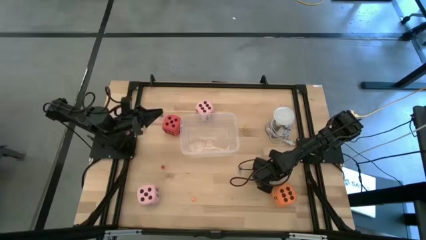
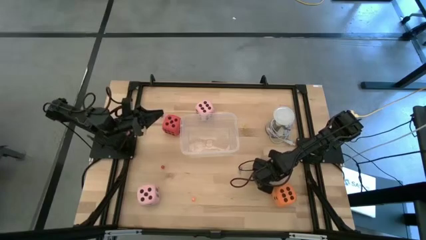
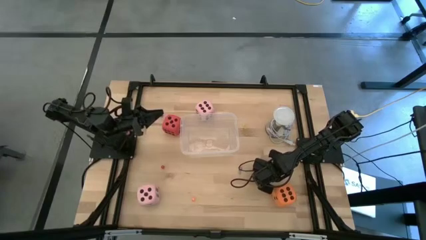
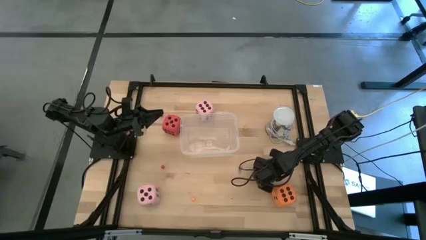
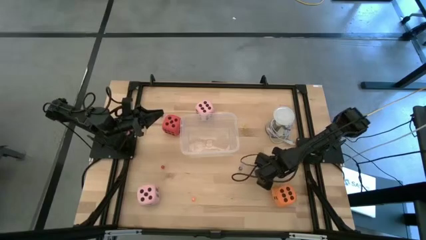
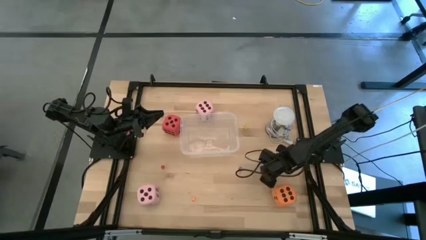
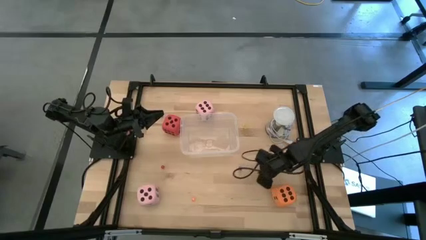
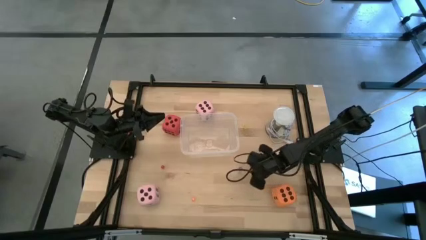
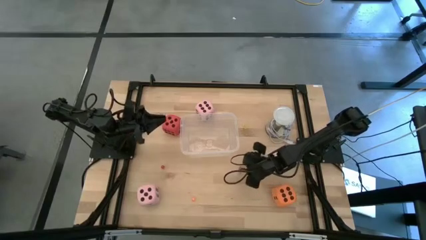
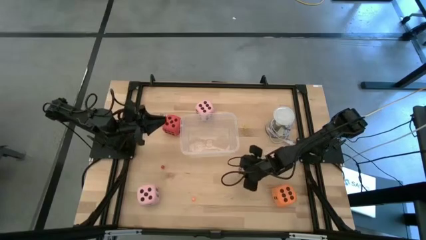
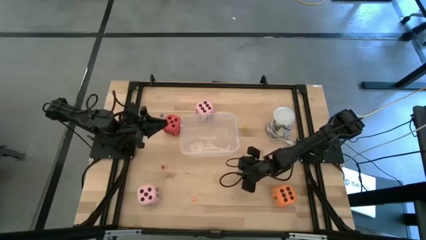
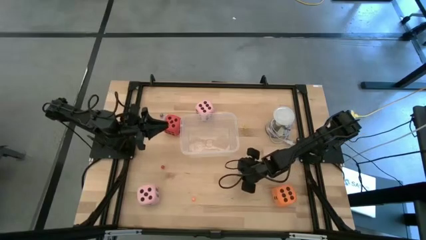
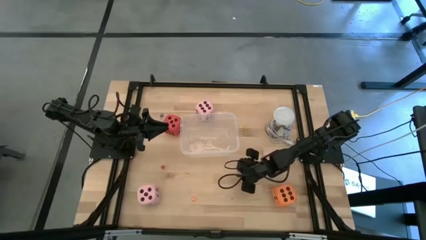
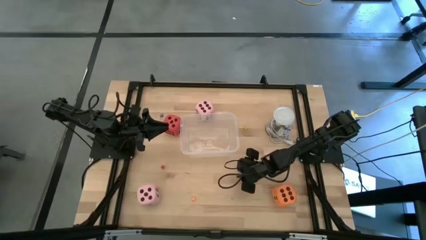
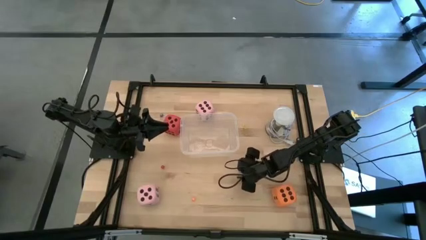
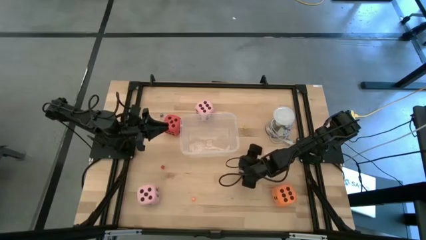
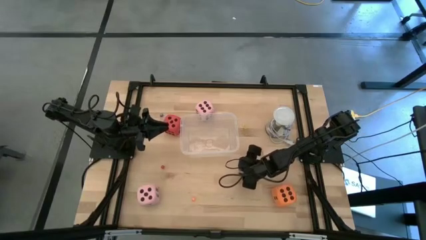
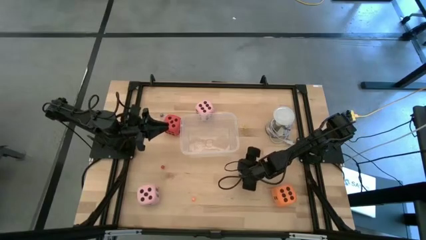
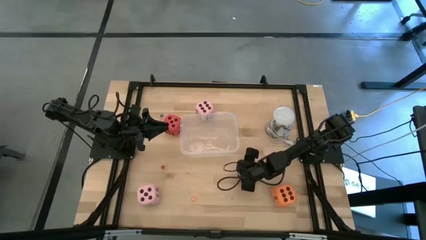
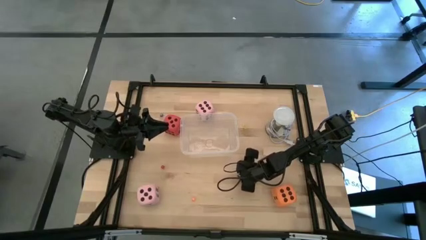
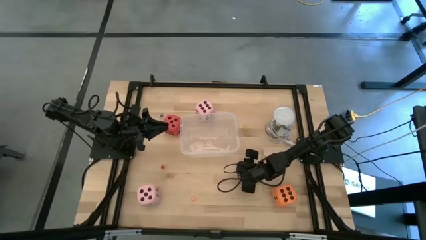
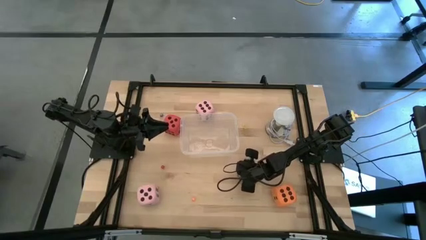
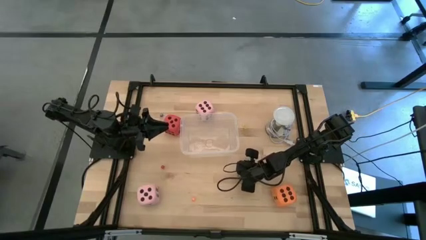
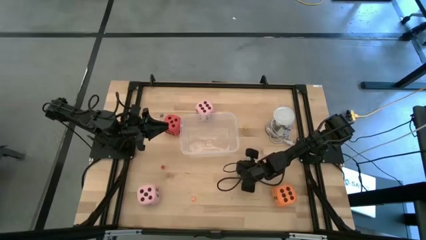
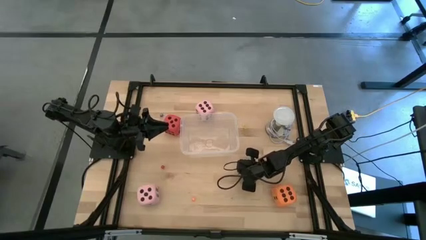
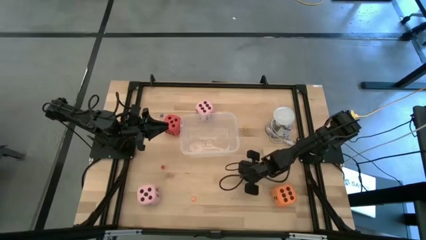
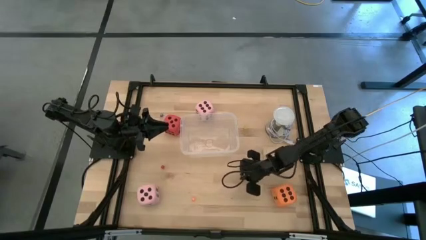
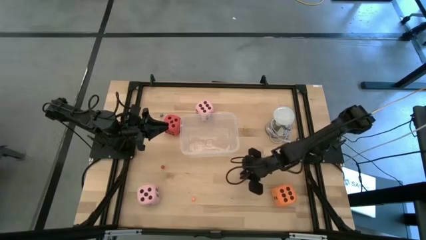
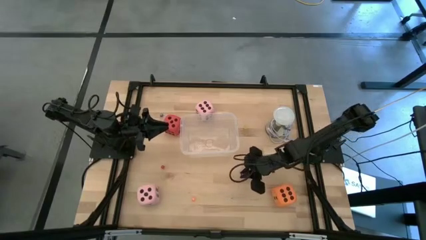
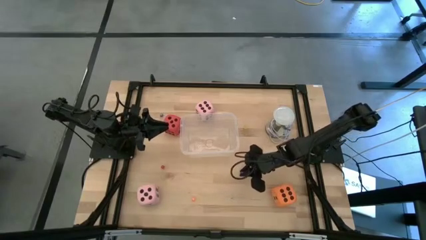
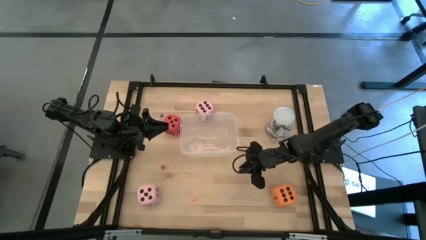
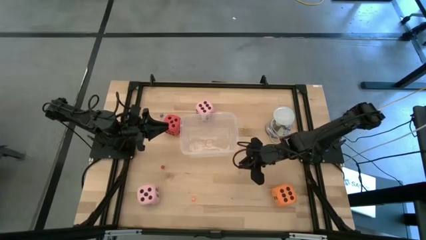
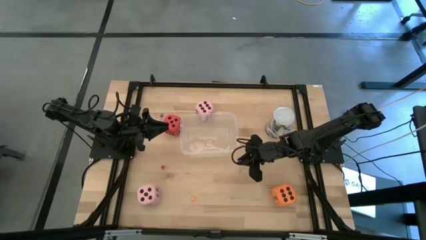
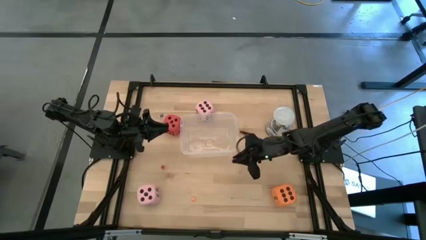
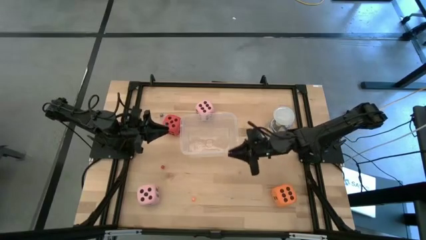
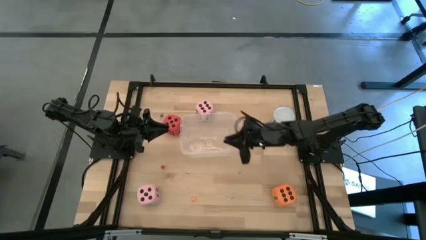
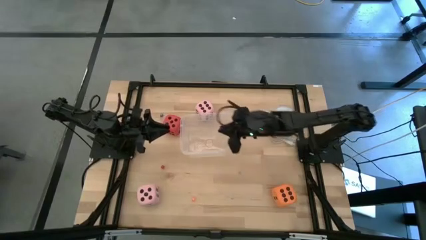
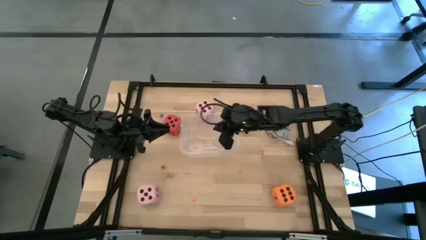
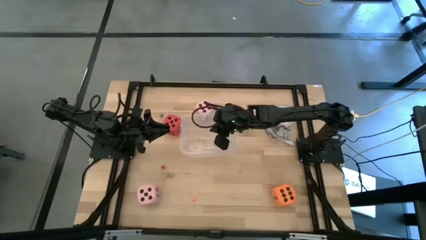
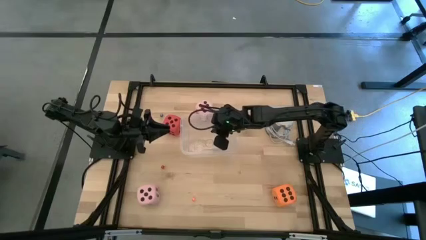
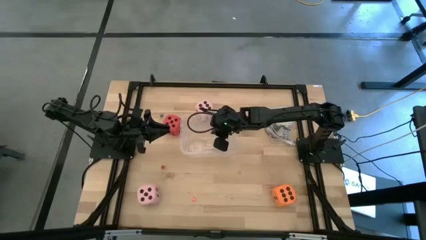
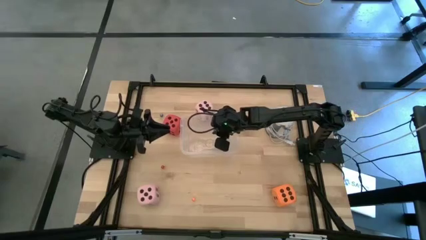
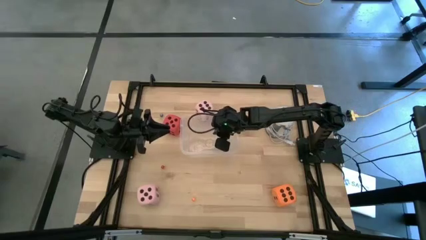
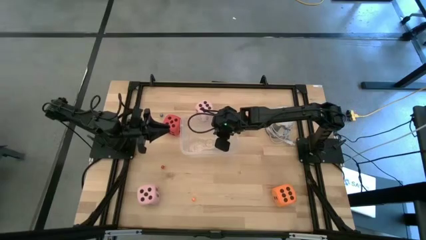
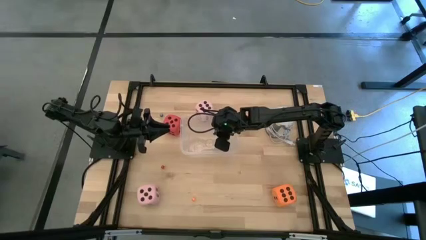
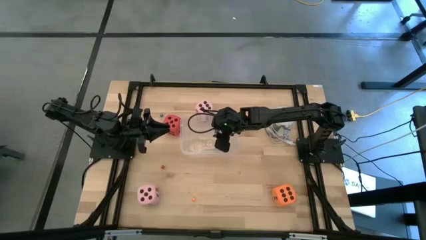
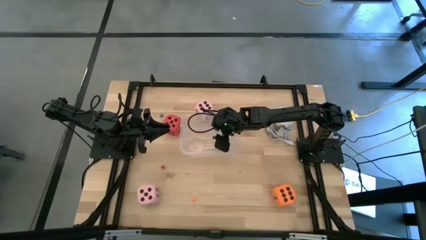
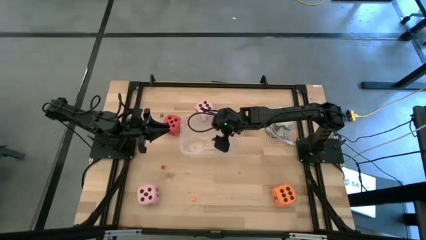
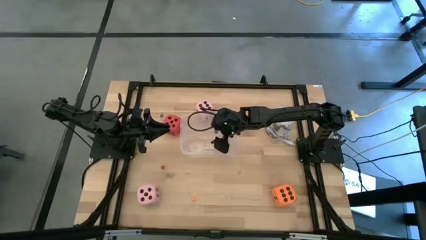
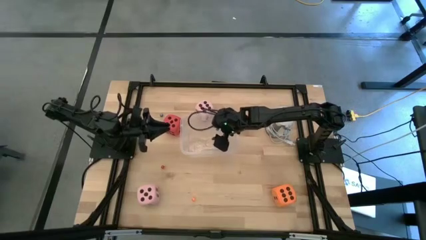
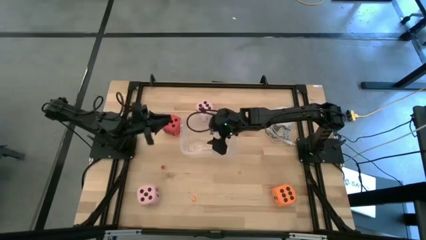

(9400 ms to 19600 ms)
Task: Pick & Place Dice
Put the bottom small blue dice into the transparent bin

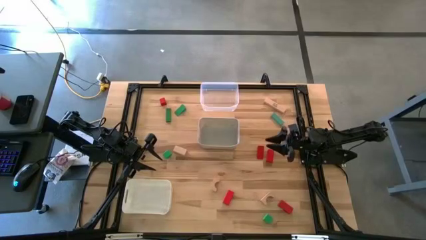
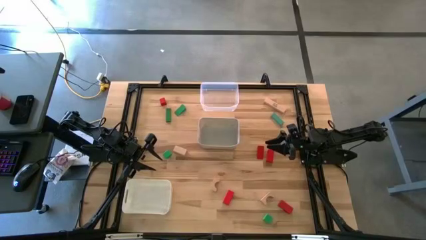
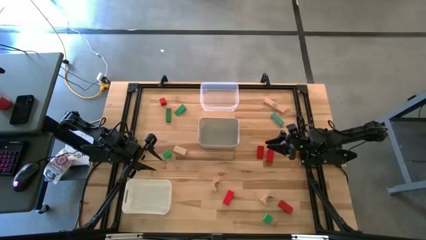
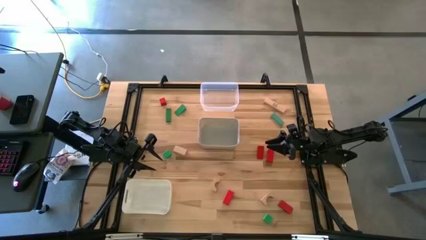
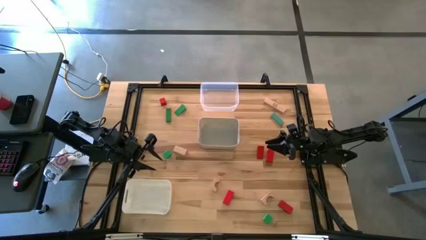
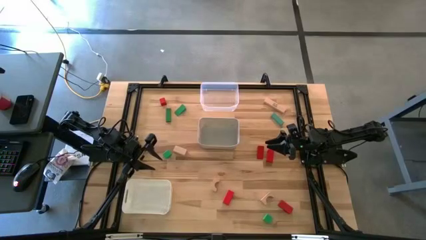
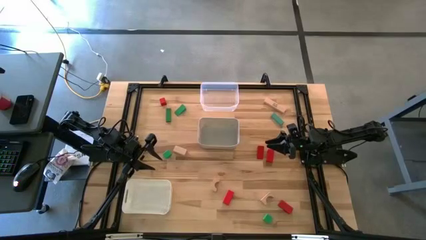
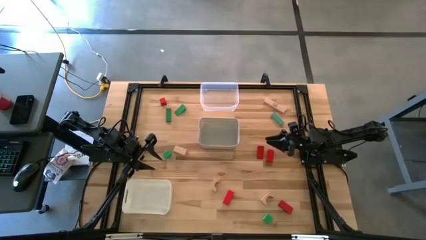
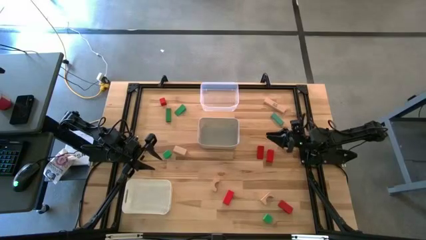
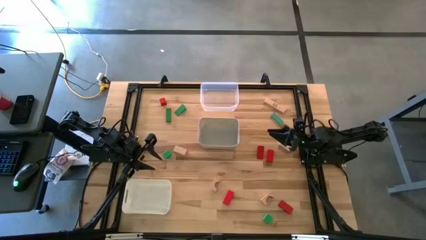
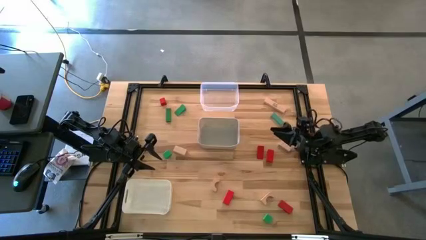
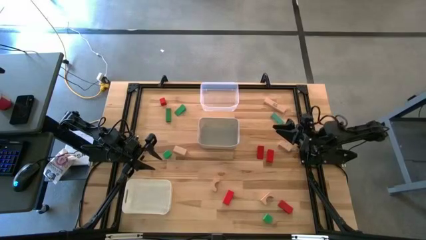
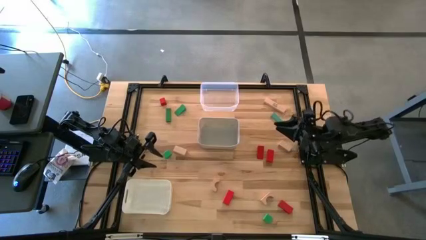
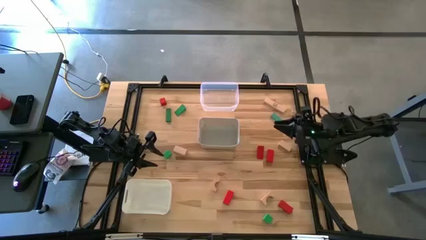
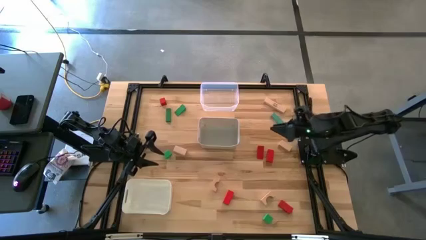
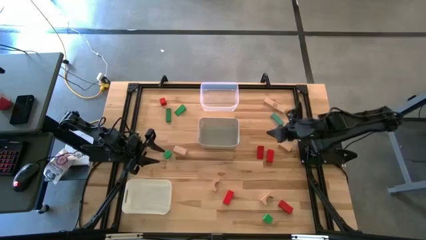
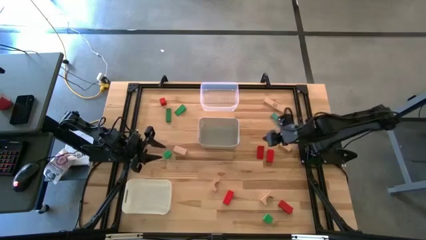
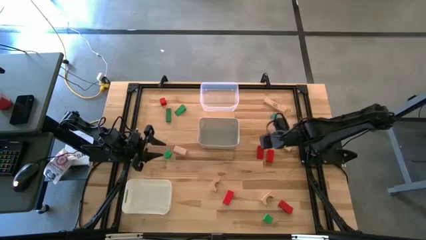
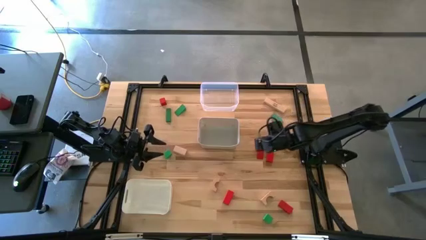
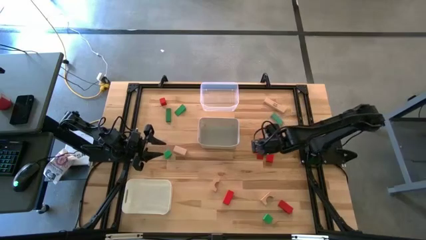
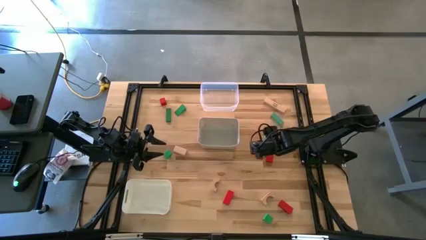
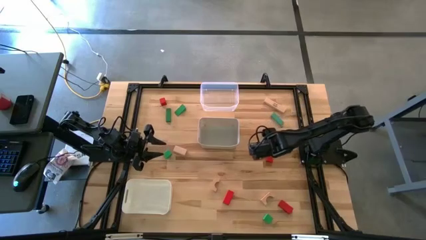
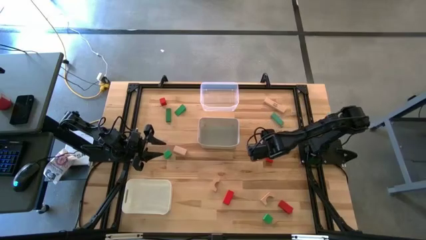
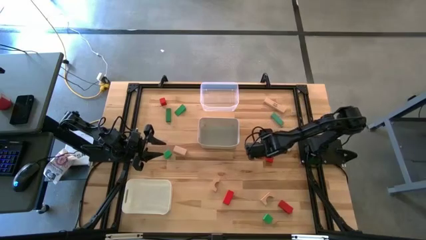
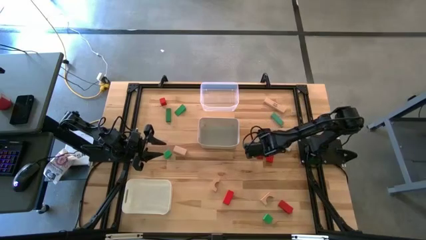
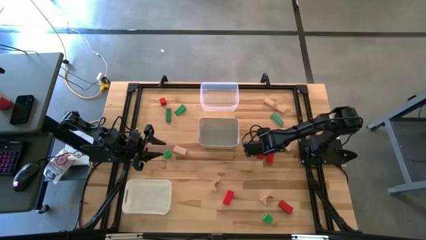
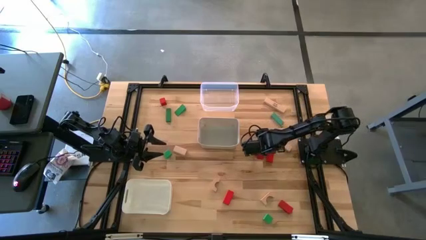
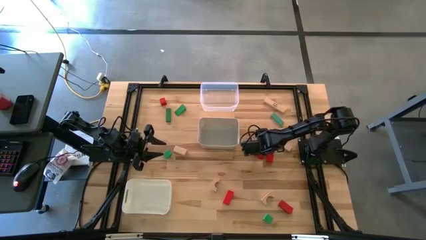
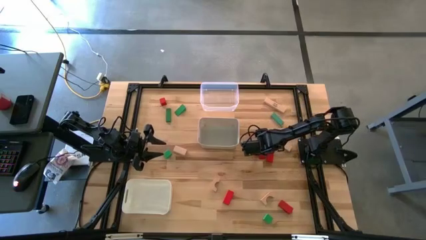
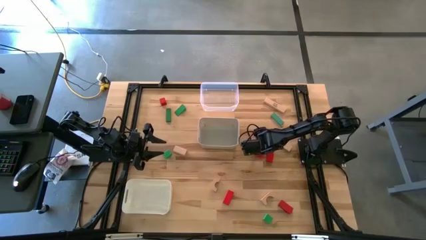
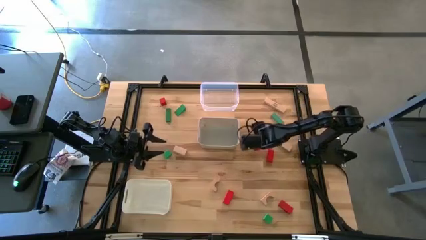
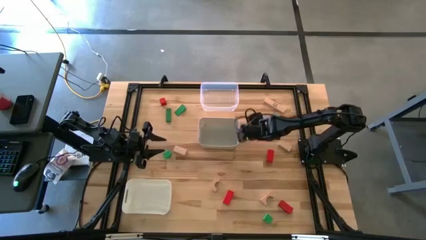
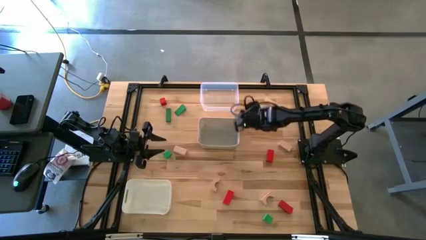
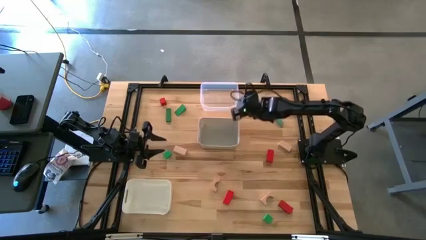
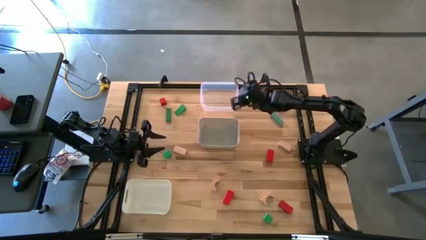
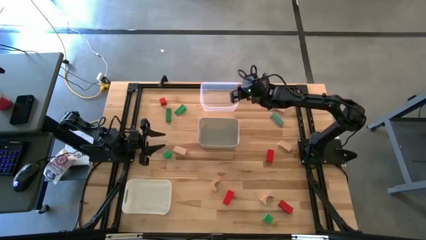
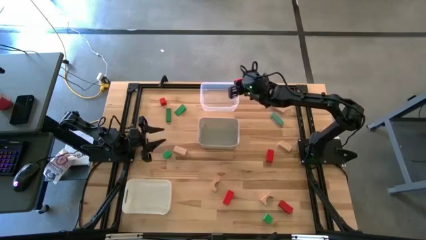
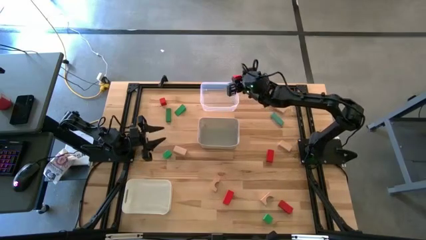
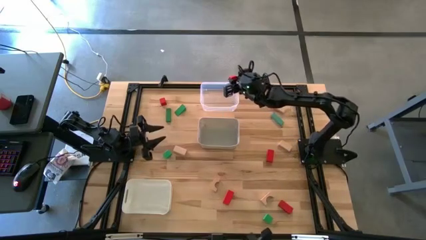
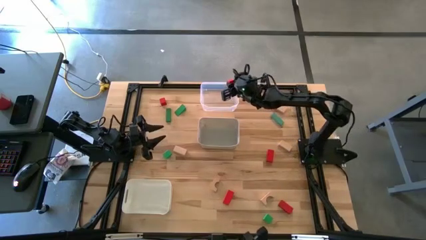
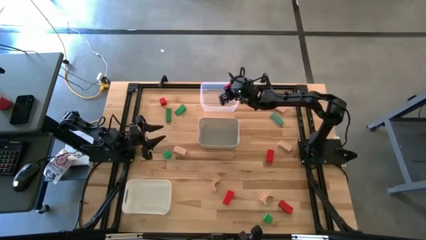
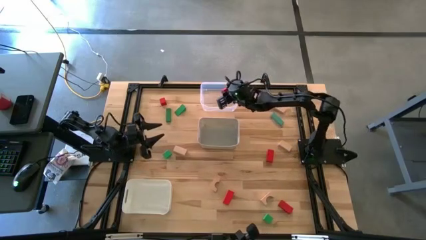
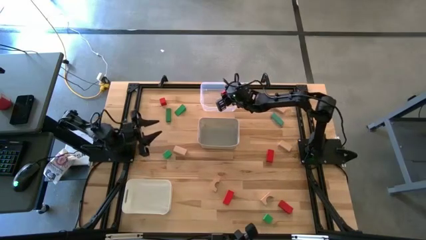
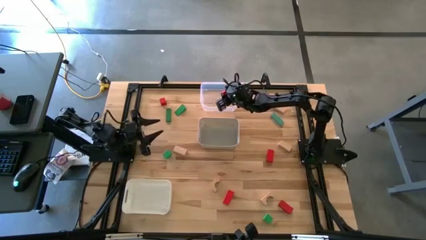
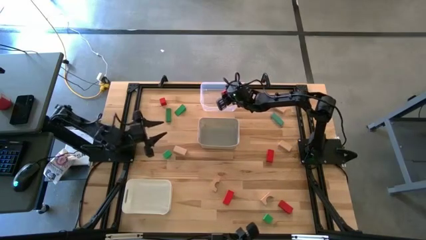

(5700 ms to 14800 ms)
Task: Sort & place blocks by color
Put the red rectangular block into the transparent bin
